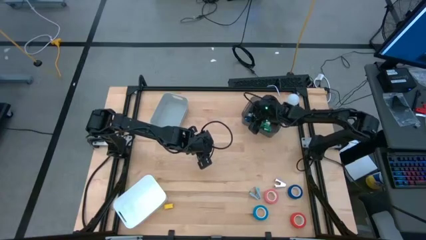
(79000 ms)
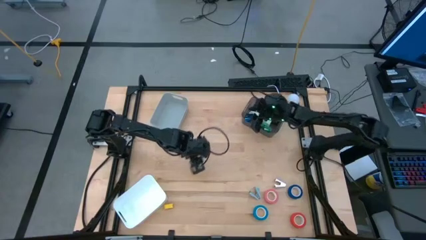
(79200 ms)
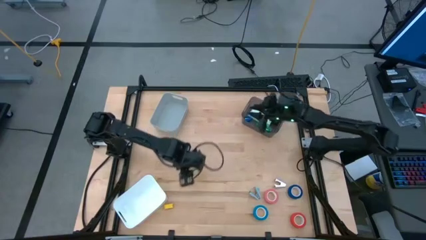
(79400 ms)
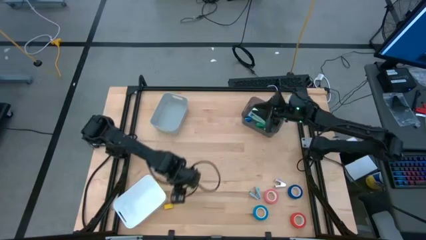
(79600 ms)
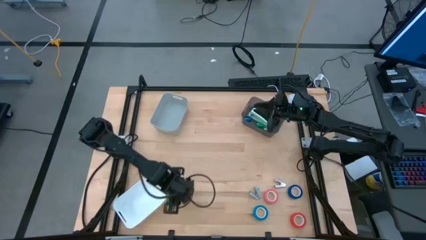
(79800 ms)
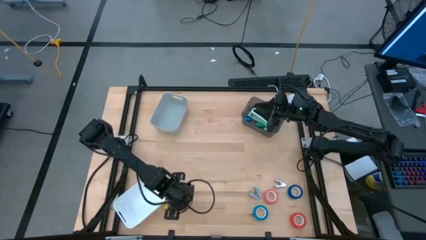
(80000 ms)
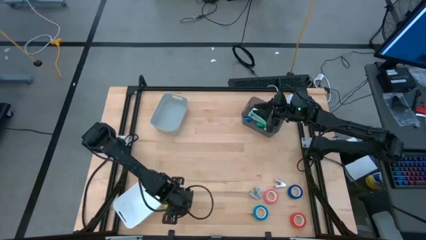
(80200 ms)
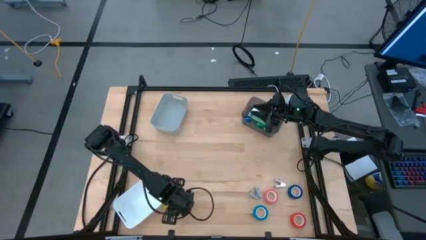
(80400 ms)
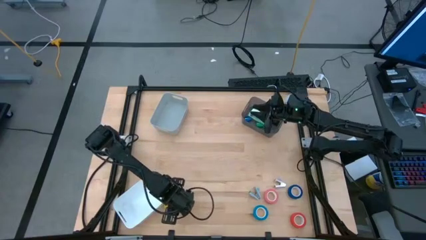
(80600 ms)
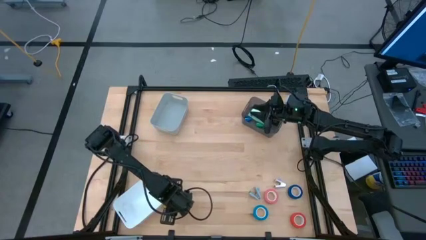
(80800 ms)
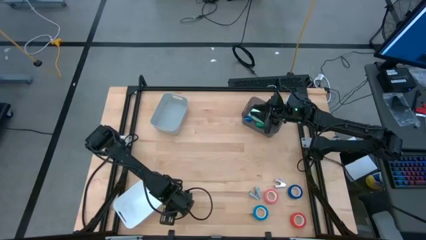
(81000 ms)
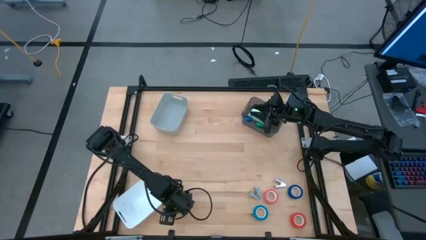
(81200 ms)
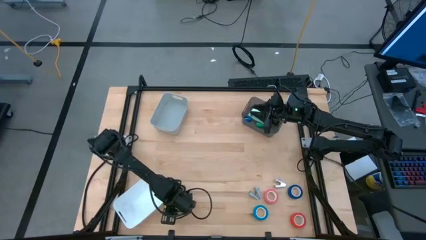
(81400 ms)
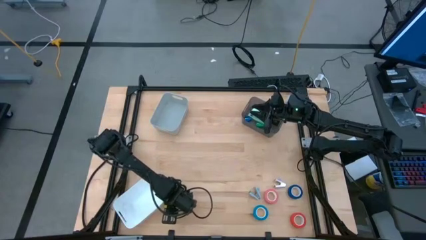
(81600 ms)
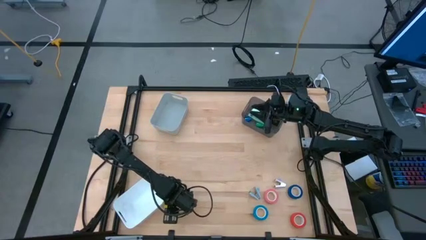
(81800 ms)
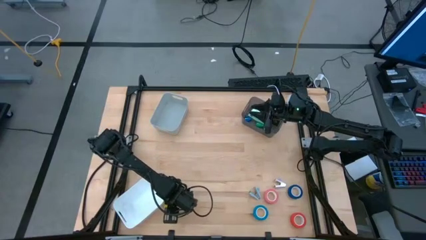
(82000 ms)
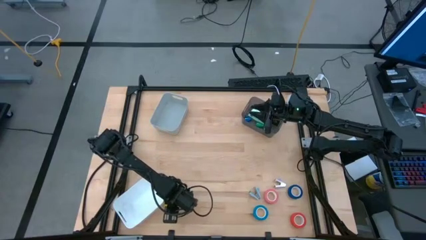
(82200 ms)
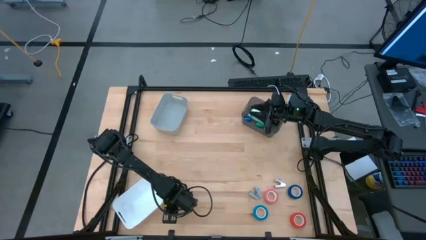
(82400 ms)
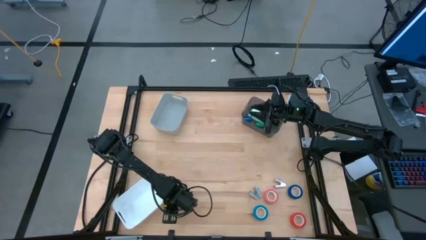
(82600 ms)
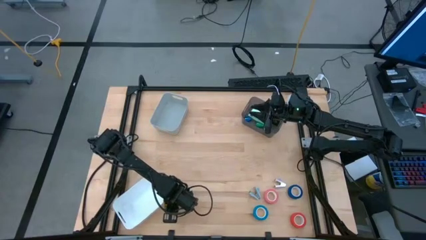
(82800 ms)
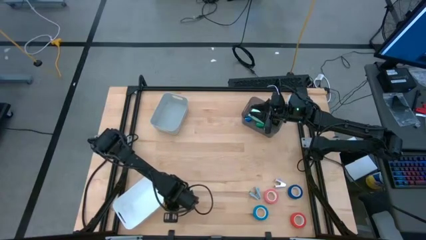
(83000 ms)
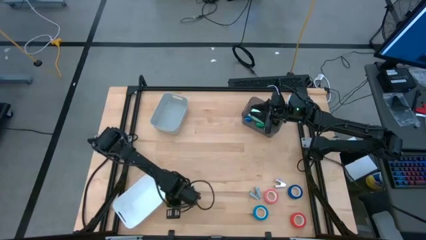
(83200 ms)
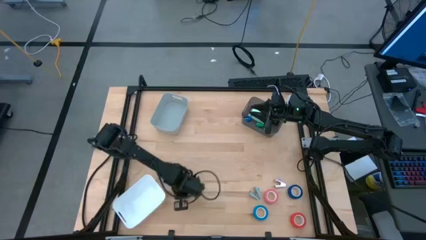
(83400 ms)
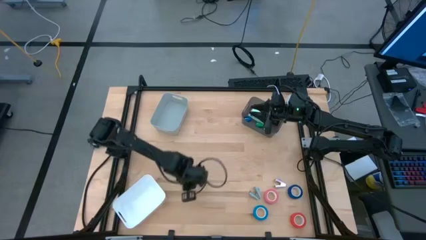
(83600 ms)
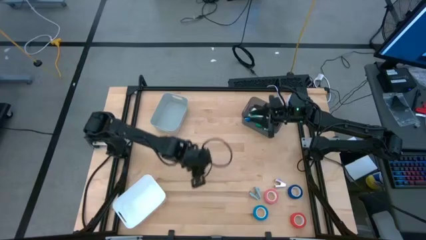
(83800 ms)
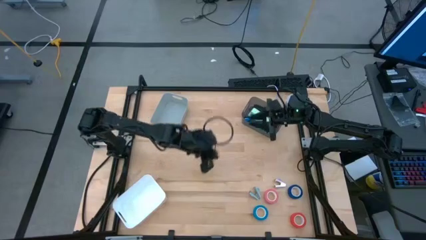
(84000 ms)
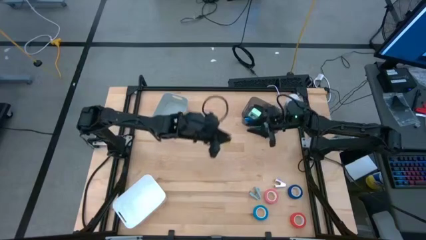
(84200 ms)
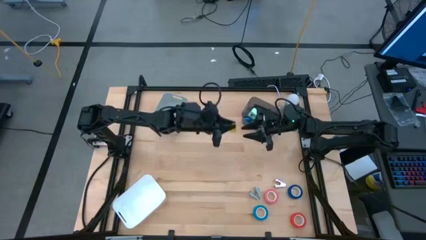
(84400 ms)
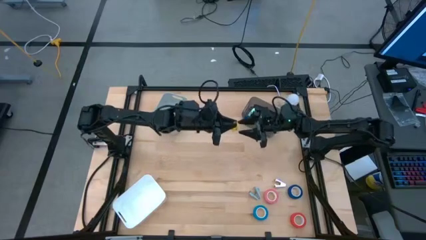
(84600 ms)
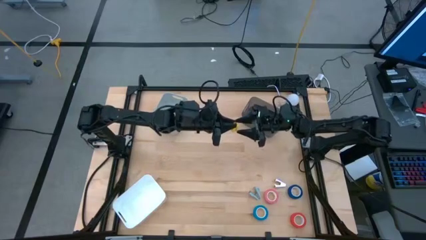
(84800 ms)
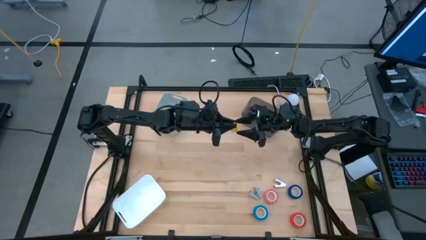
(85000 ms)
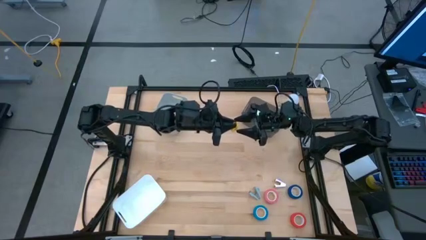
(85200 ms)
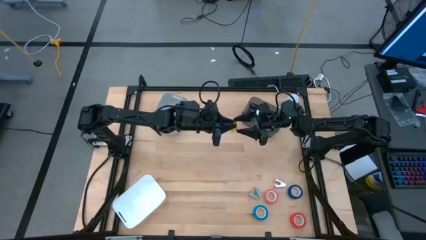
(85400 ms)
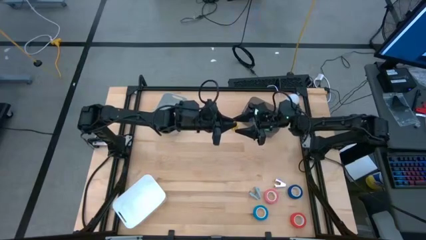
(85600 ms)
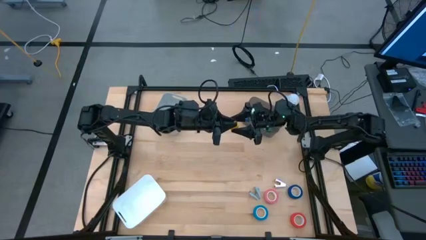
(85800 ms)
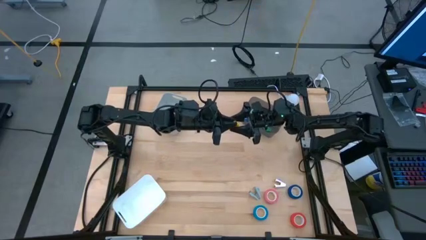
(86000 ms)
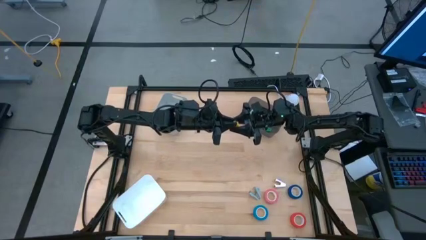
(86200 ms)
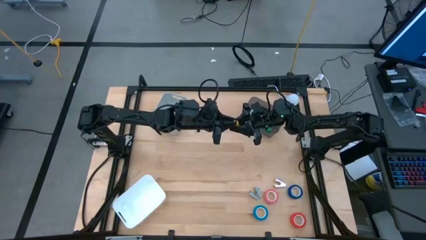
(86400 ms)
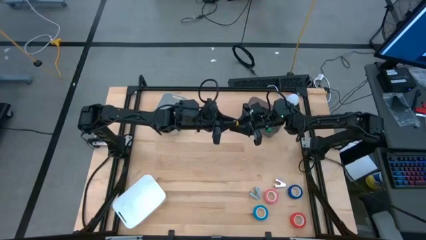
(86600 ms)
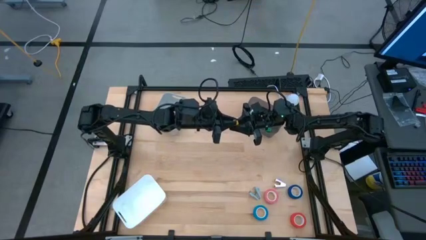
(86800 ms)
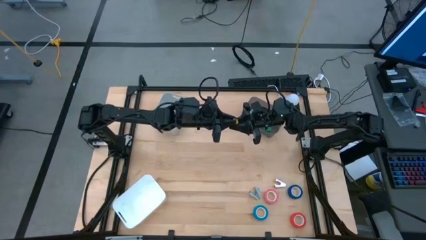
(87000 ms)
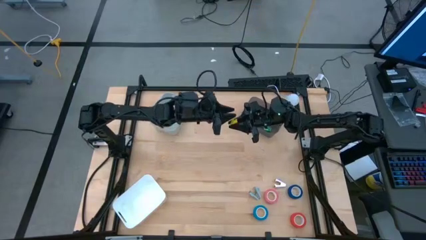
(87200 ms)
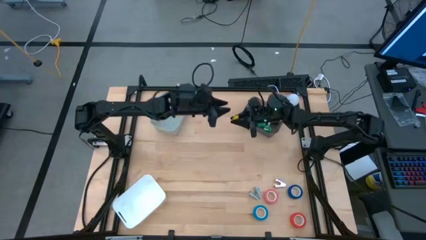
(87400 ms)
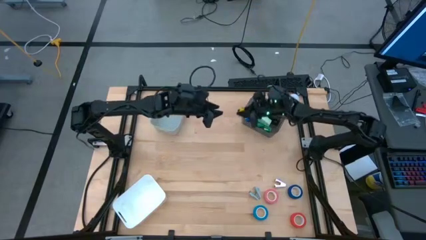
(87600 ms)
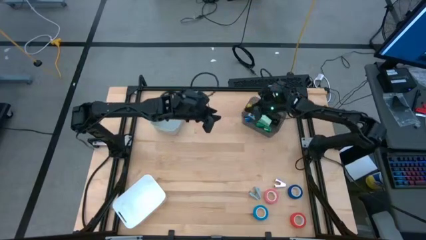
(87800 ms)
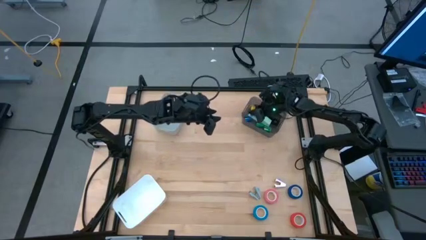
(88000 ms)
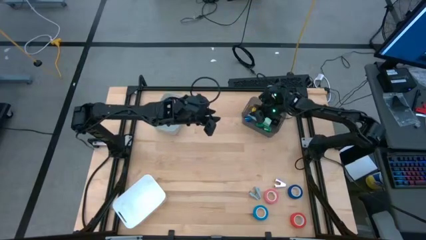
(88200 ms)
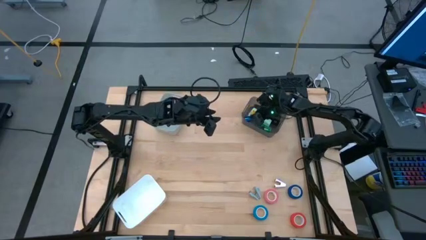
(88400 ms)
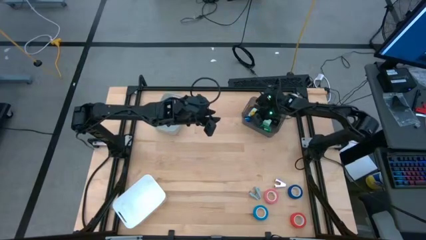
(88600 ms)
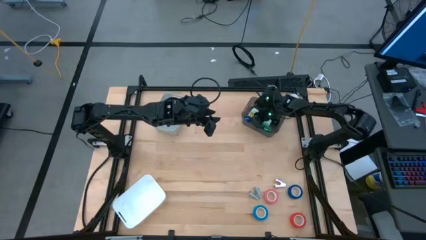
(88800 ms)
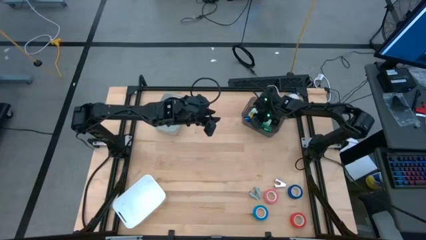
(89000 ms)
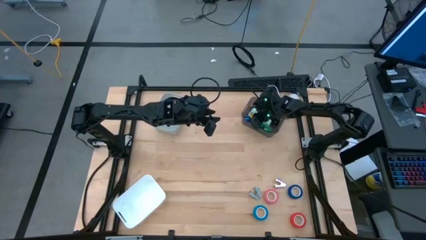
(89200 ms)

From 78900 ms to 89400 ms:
Task: Pick and place Stapler, Stapler remover, tape
Put the yellow stapler into the black bin

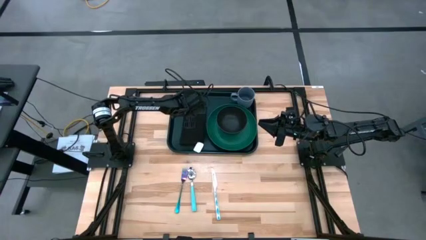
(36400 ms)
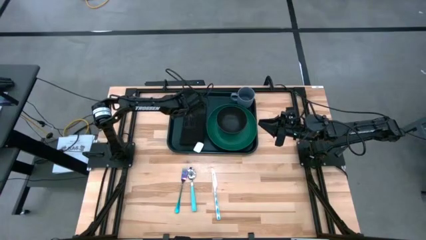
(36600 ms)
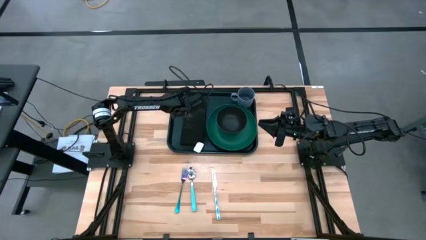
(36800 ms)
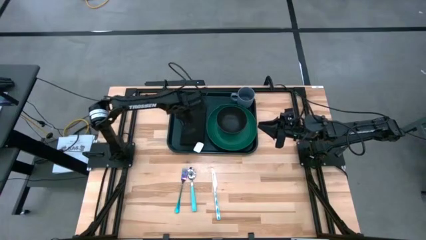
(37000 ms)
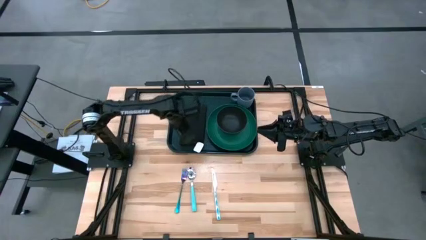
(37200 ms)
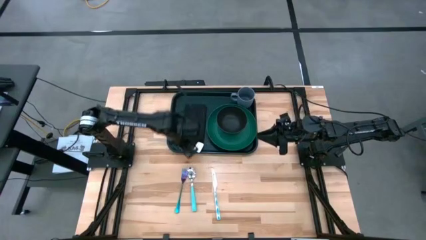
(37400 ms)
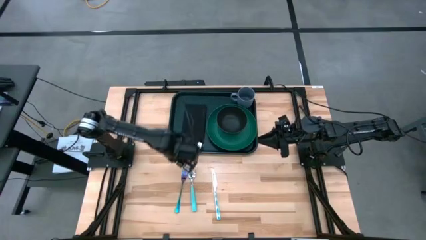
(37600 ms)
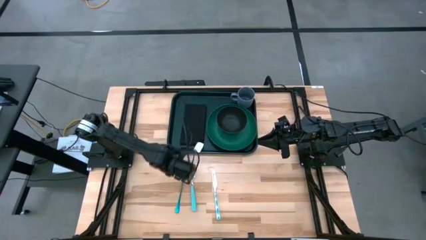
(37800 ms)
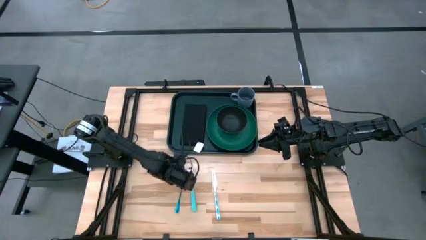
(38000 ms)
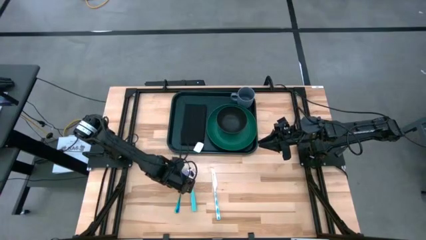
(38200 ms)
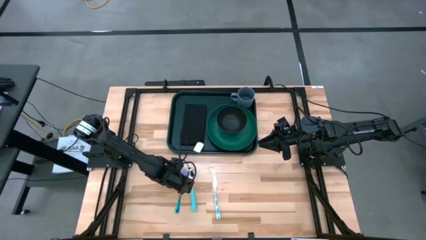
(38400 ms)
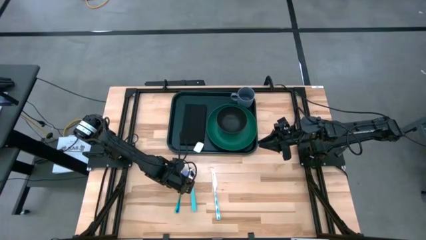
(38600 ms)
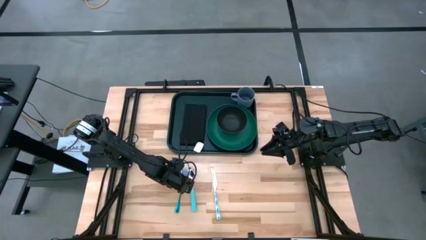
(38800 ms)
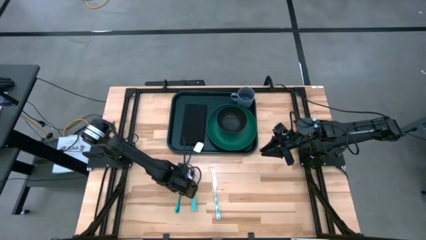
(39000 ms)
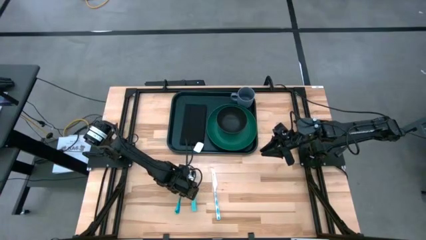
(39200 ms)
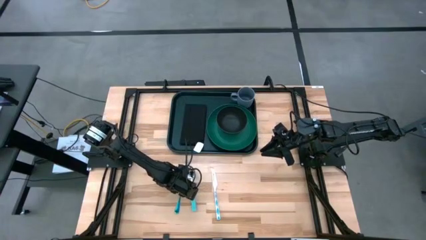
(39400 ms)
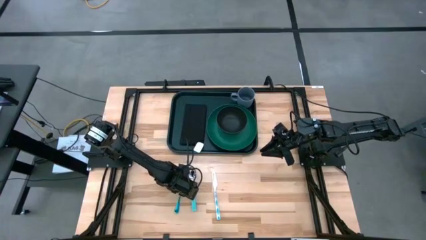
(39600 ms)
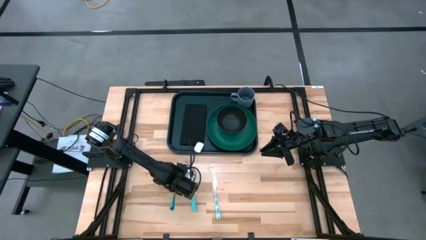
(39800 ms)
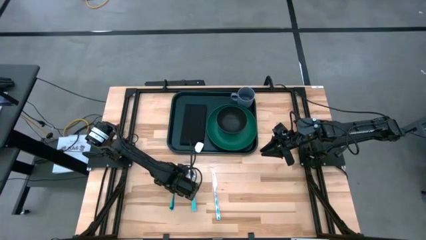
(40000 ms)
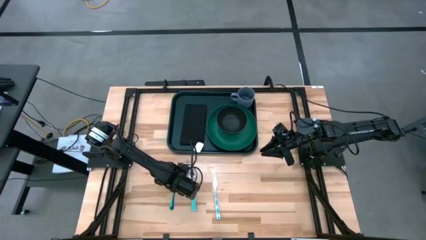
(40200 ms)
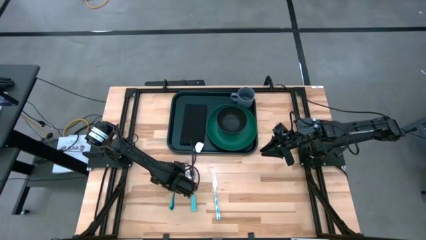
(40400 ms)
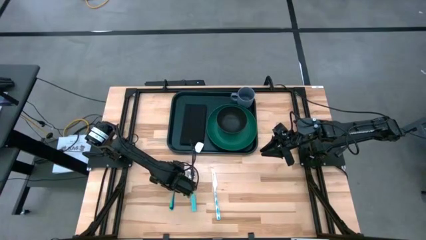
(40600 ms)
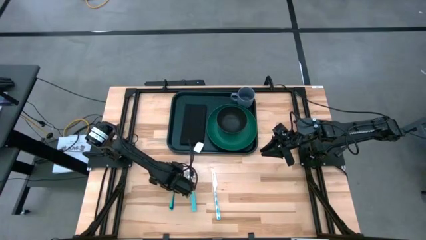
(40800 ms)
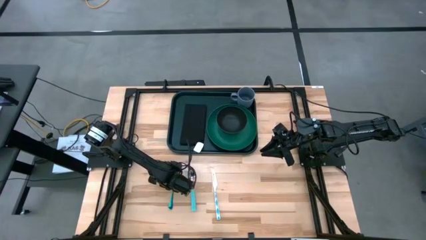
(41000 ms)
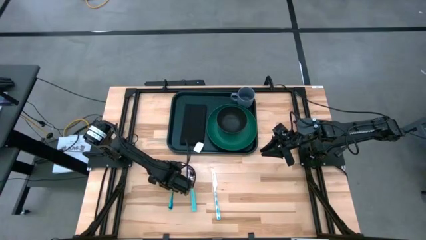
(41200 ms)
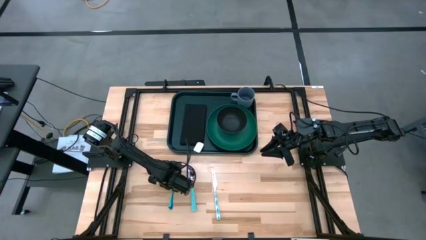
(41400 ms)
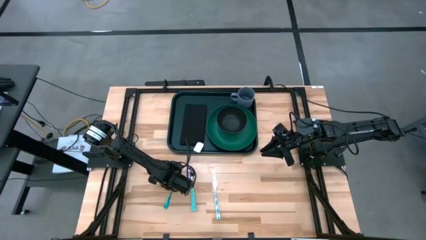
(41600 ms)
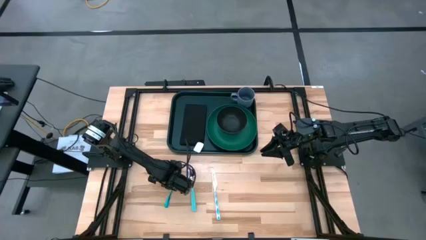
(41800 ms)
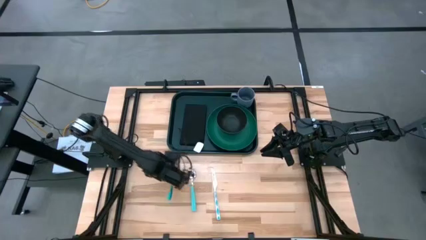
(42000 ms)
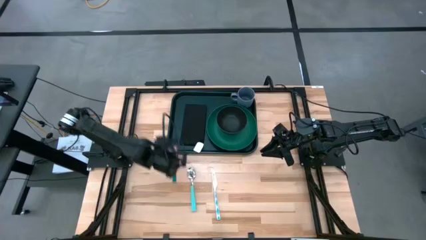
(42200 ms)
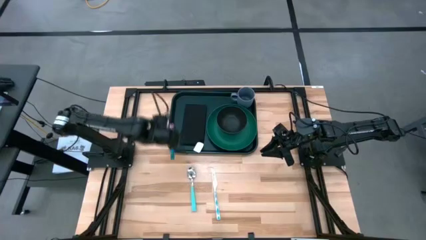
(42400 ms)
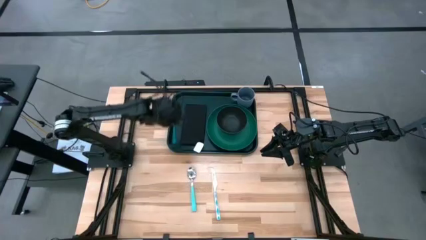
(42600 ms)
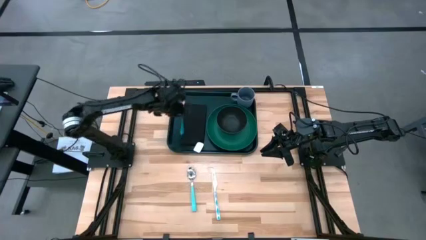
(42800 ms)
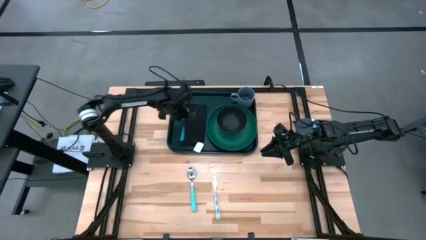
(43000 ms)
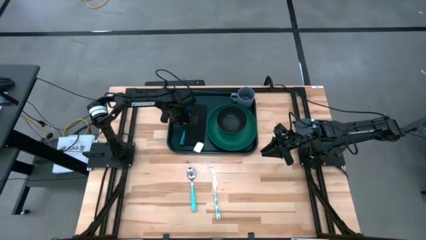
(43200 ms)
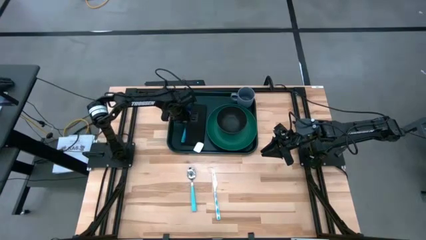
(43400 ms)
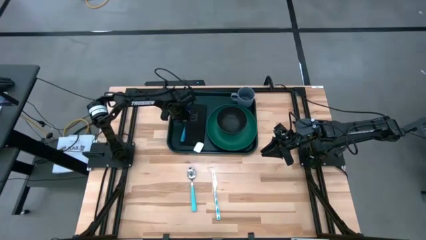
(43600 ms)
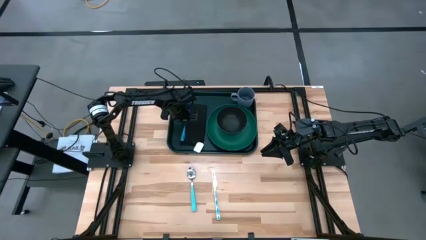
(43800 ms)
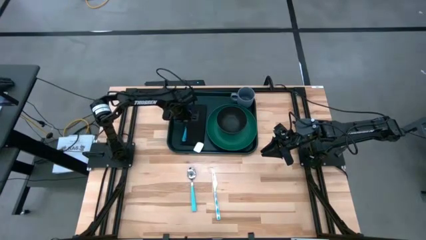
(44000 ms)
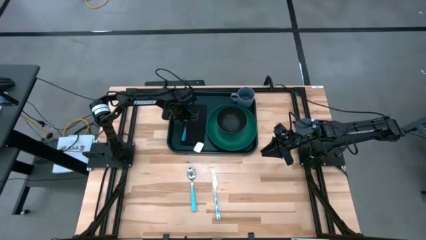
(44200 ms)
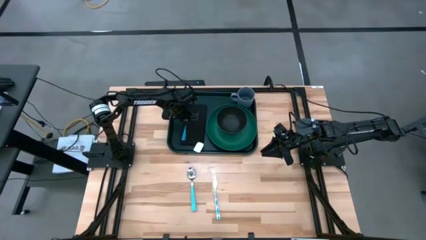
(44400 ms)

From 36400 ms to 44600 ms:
Task: Set up tray
Put the fork on the black table napkin
